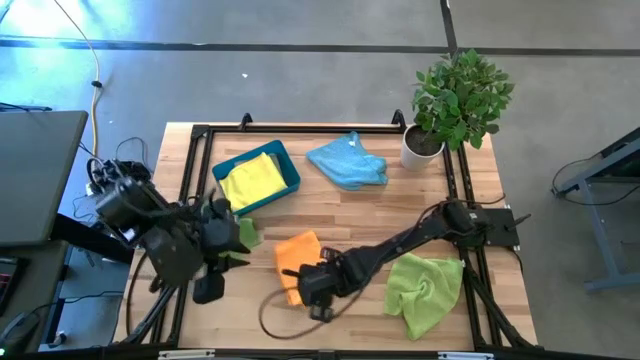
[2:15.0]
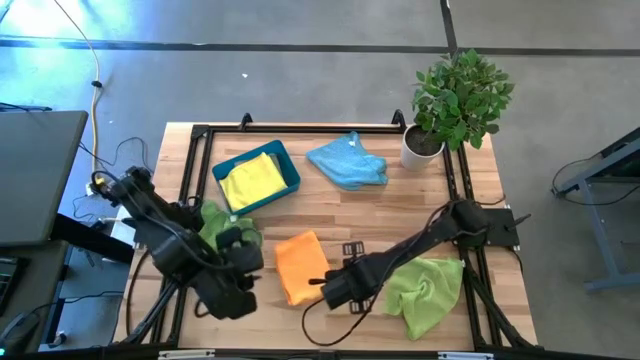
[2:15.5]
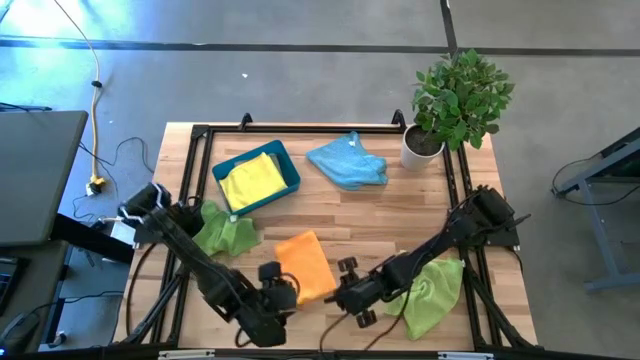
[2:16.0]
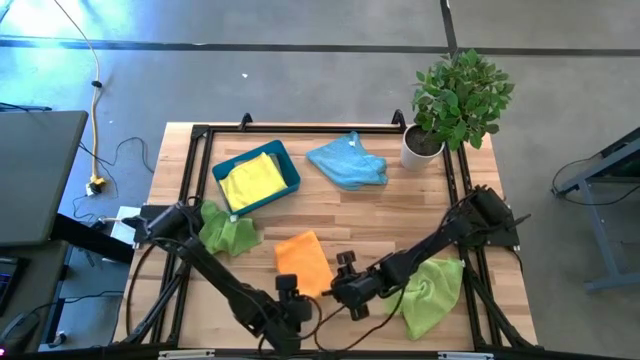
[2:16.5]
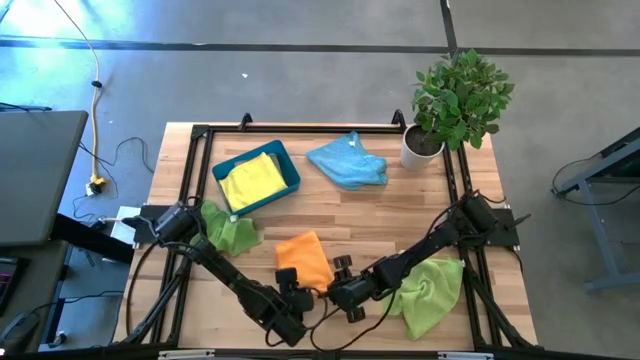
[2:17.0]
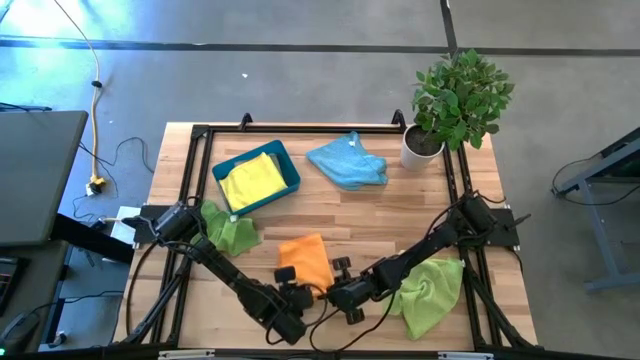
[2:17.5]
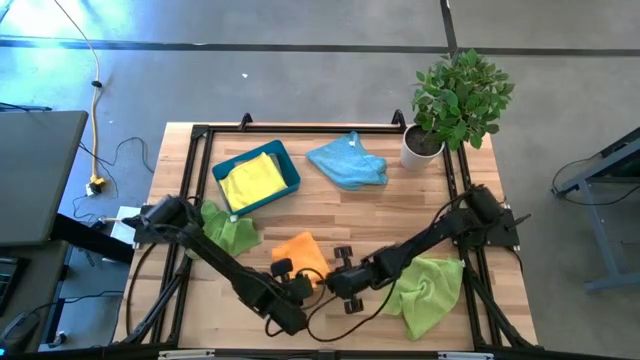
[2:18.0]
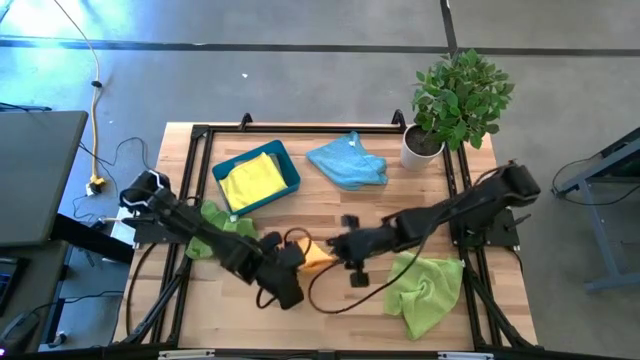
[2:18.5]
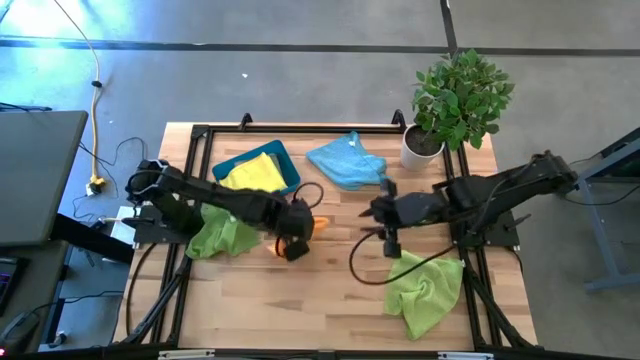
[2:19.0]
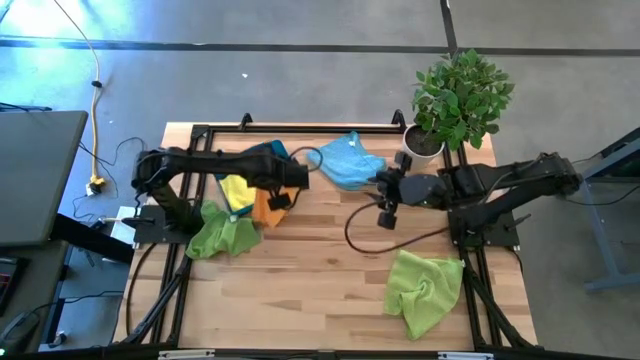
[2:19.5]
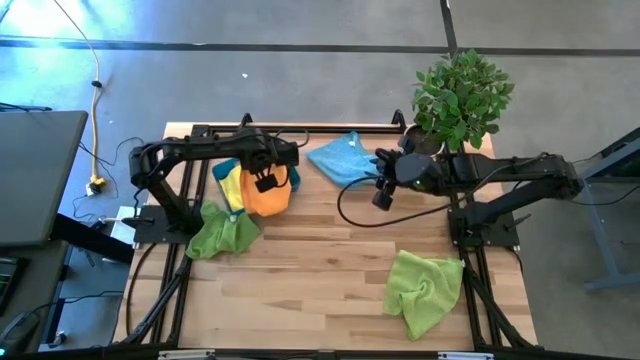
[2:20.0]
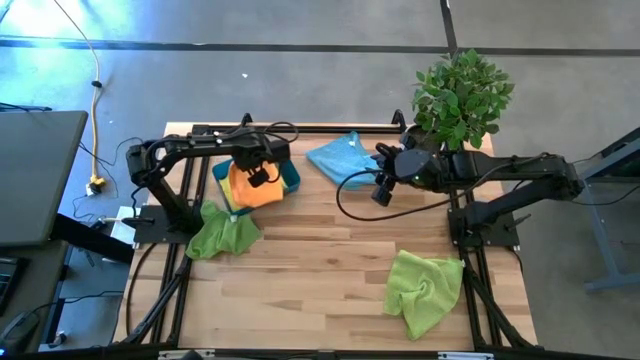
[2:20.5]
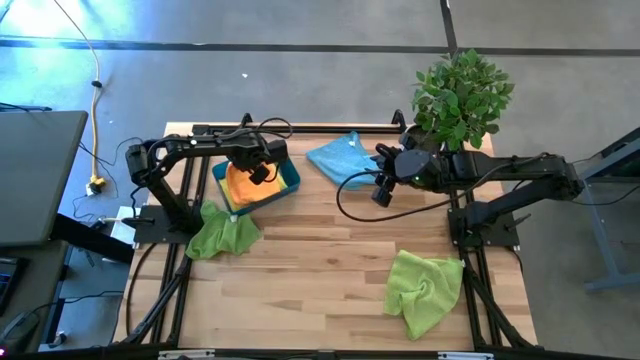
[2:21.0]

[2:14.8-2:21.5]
Task: Fold microfiber towels
Put the folded orange microfiber cloth into the bin

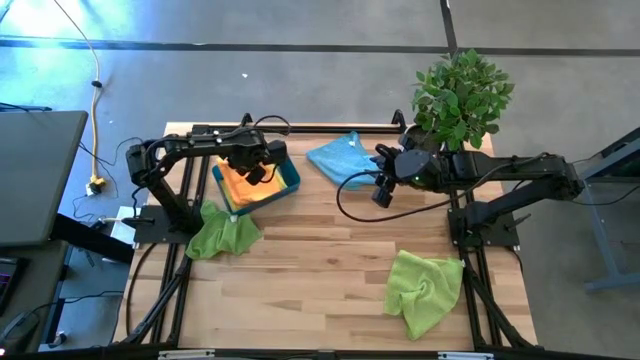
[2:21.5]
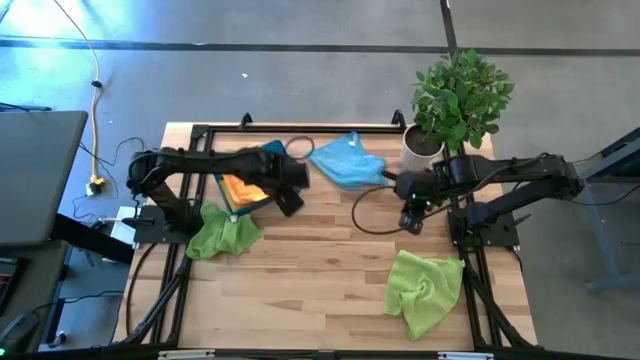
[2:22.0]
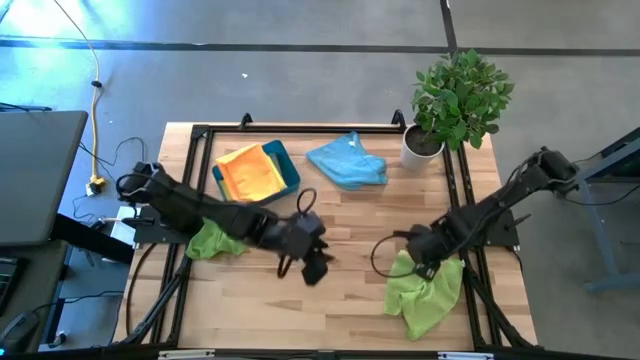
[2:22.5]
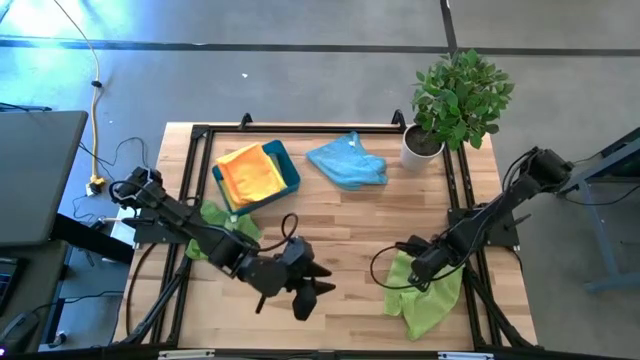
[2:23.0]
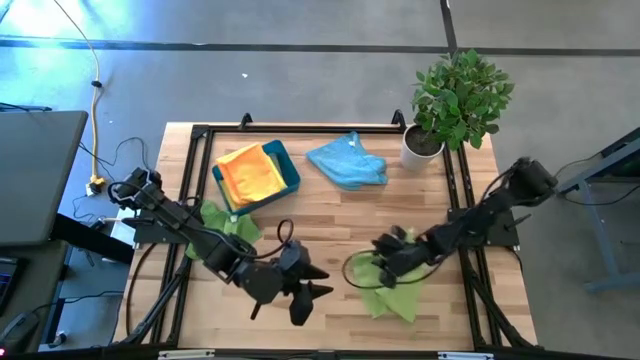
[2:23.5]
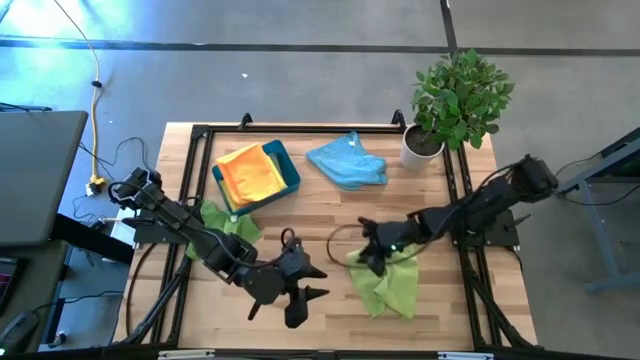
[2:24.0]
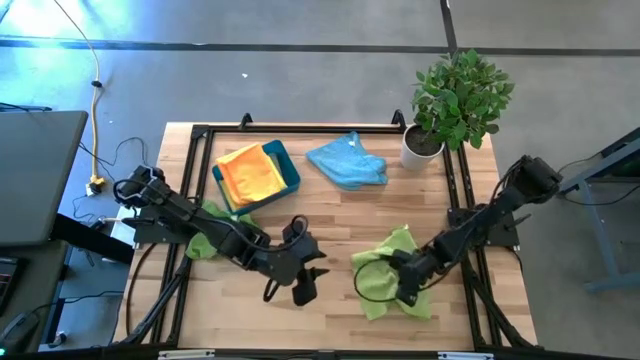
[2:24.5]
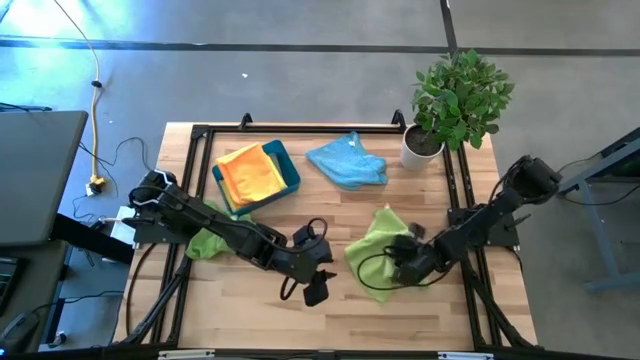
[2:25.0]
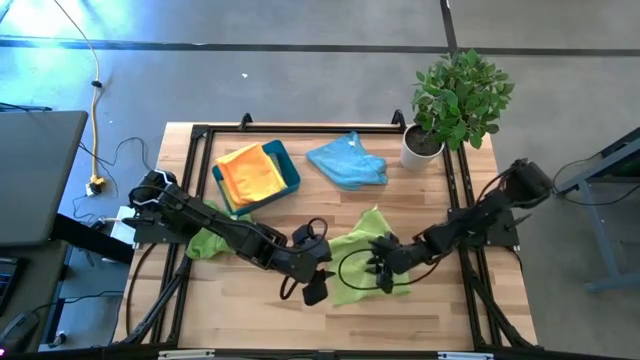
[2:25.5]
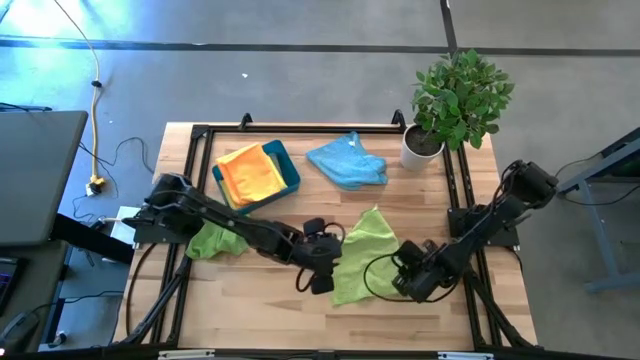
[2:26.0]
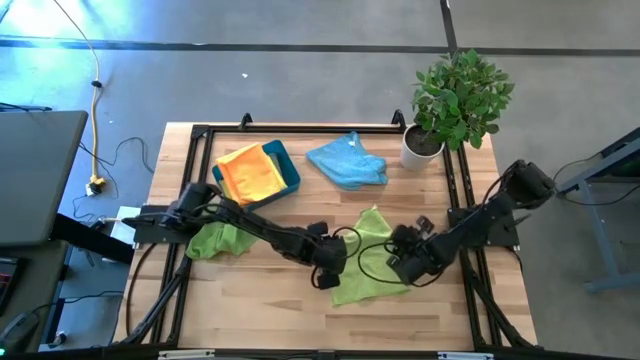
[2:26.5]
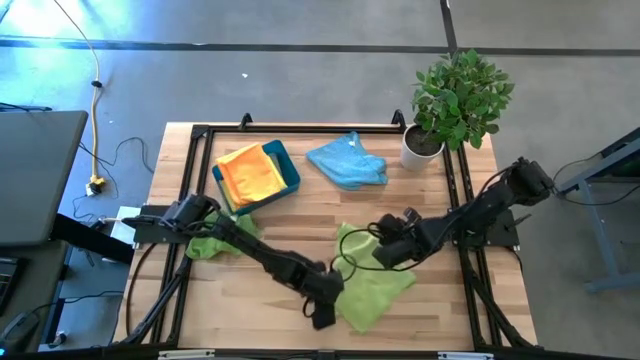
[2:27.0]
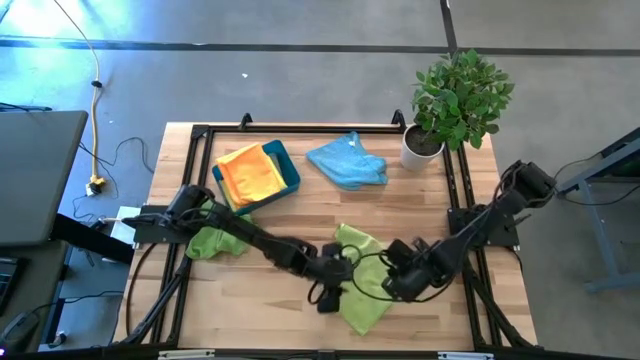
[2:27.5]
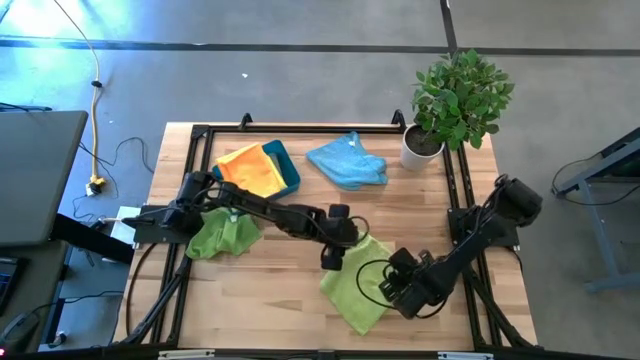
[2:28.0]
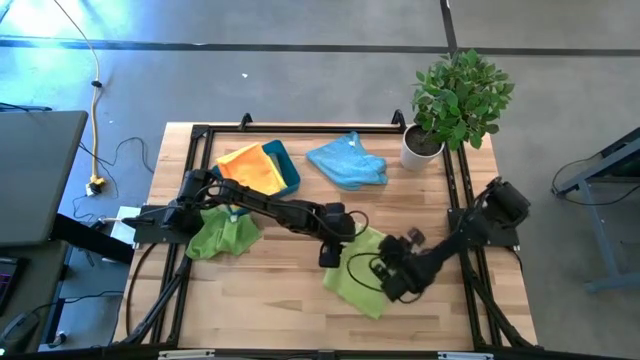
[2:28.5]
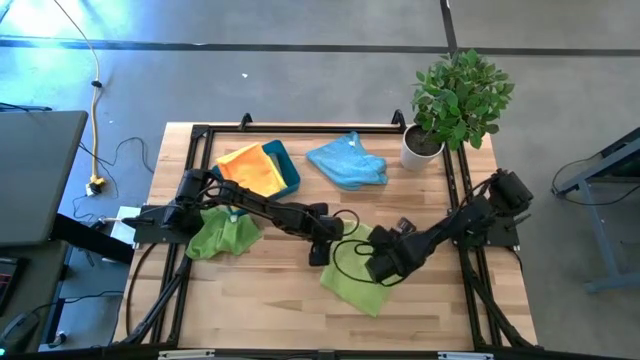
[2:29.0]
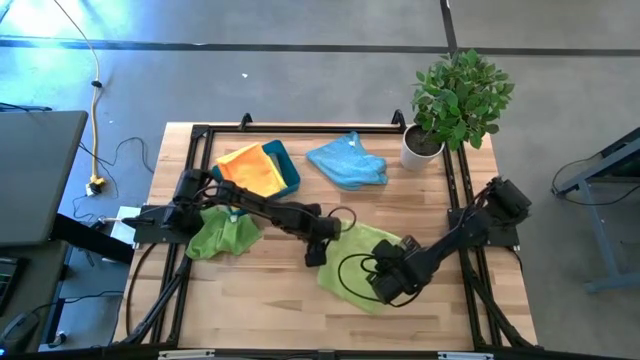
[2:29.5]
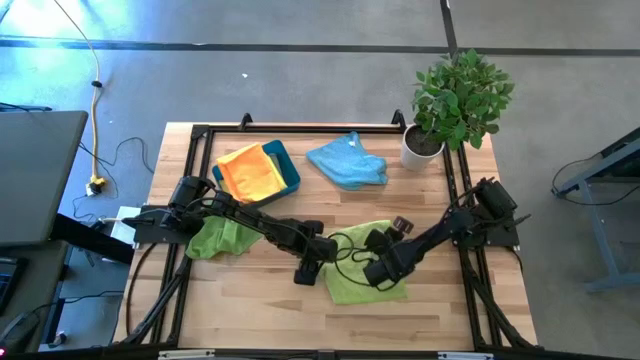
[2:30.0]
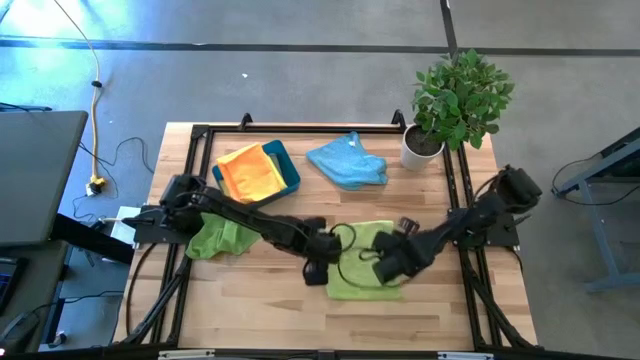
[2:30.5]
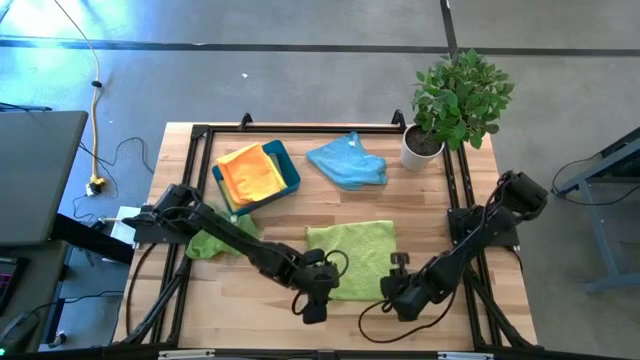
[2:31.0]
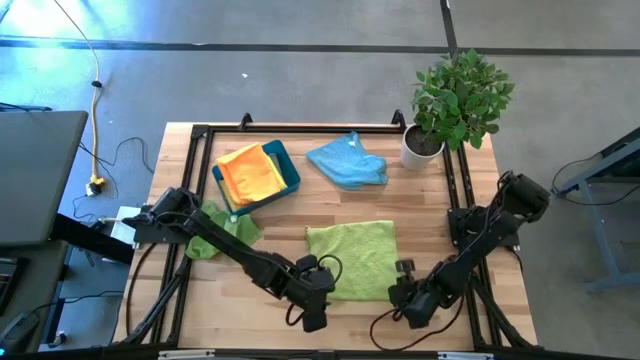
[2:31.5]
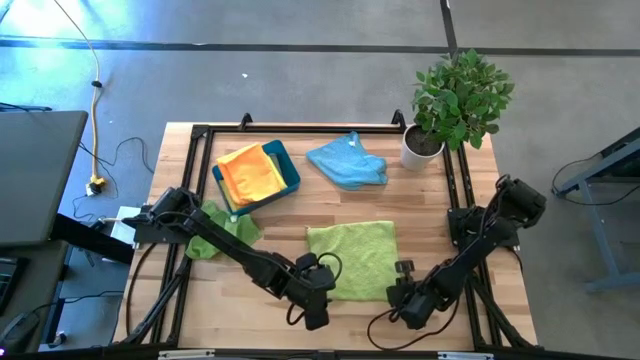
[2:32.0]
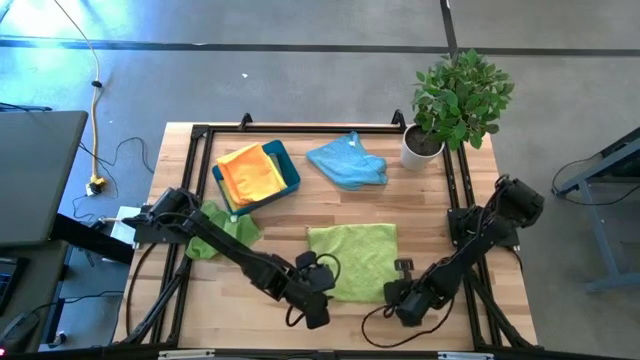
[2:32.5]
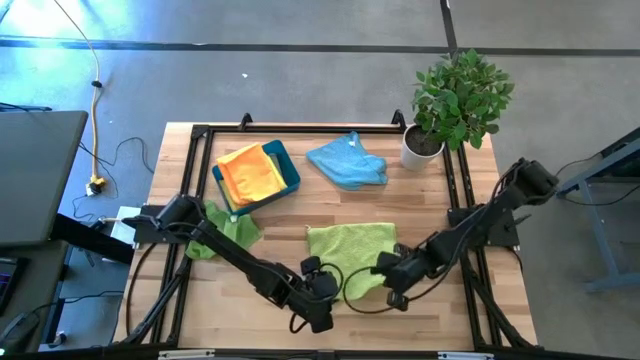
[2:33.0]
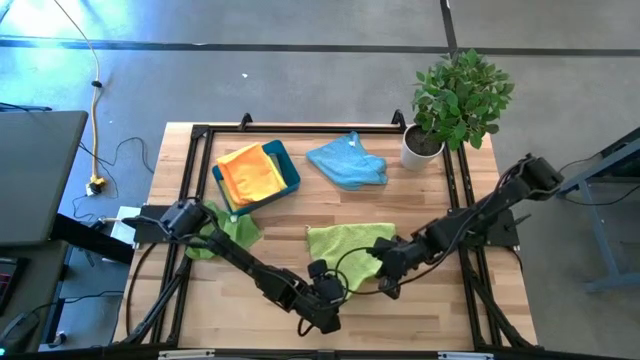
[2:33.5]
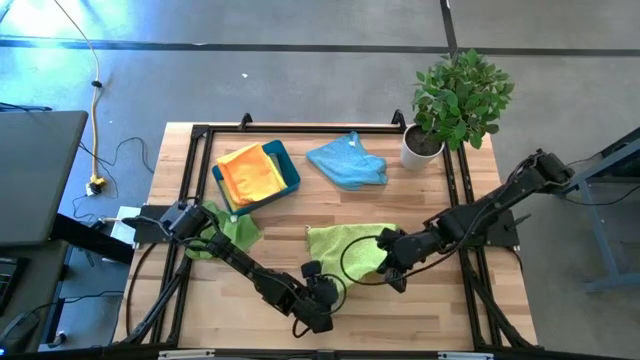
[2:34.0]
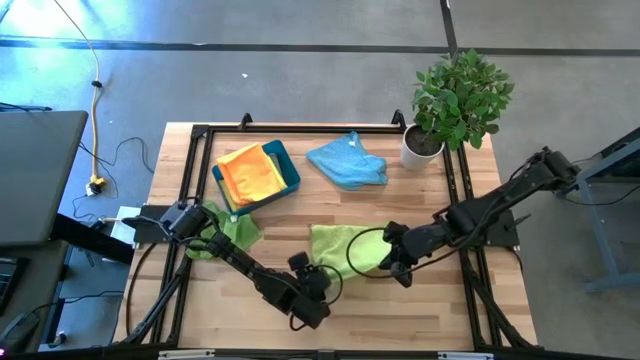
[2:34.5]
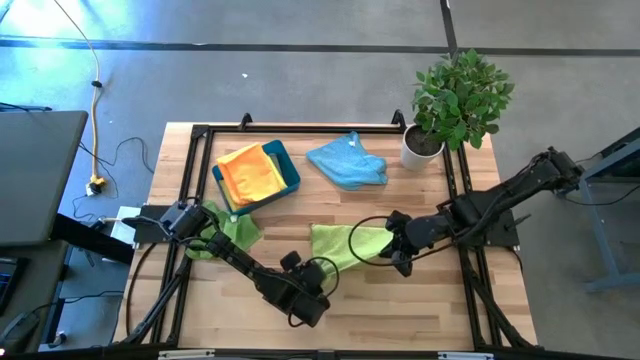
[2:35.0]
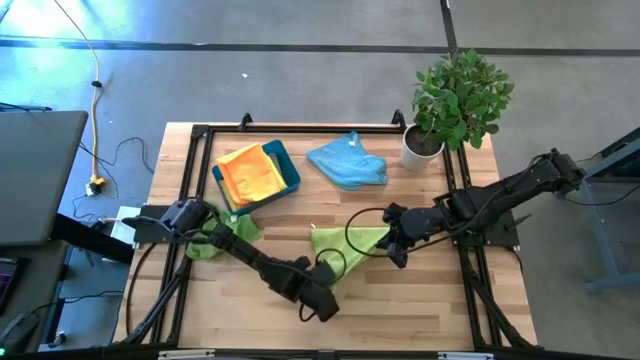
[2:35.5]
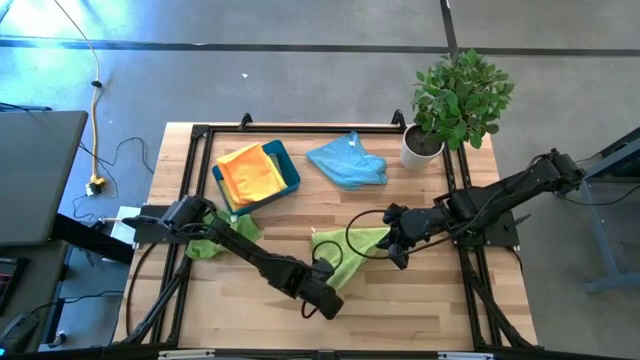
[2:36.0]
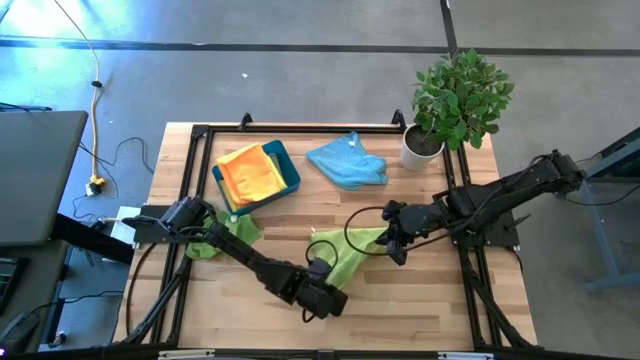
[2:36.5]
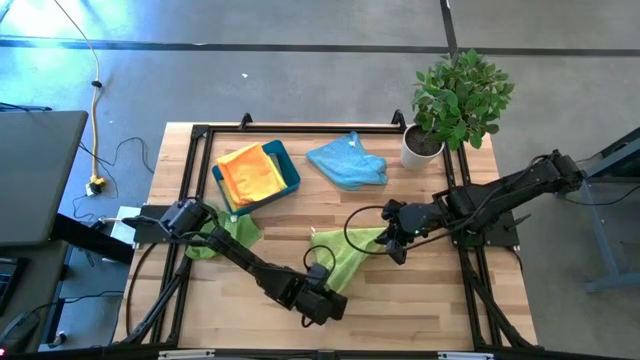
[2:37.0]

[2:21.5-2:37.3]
Fold the right green microfiber cloth
